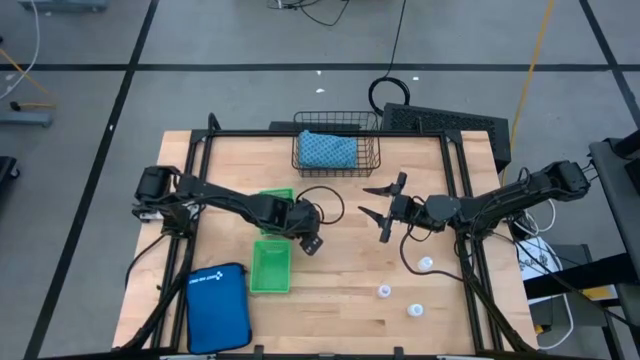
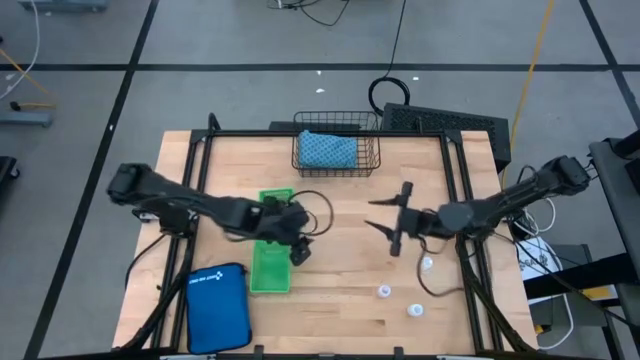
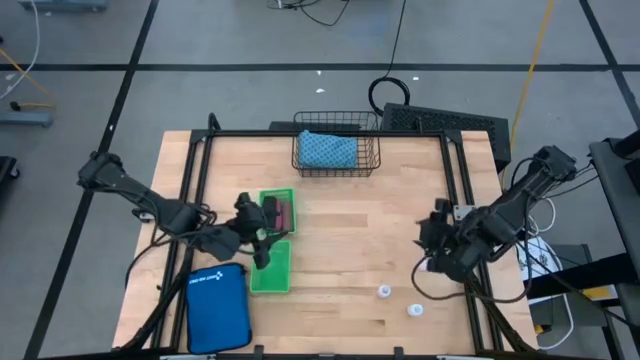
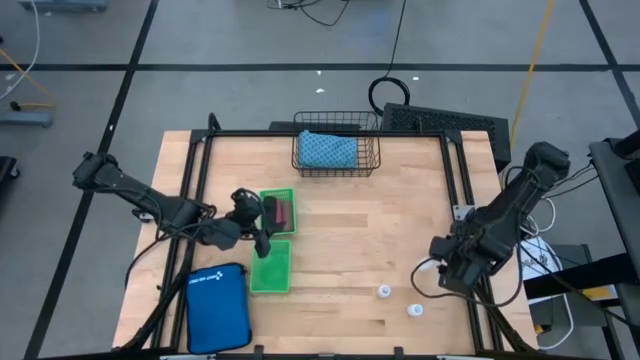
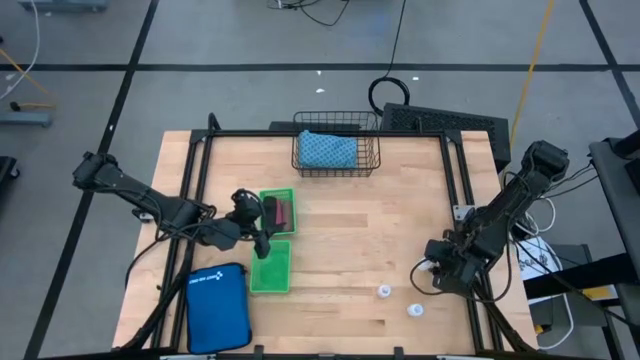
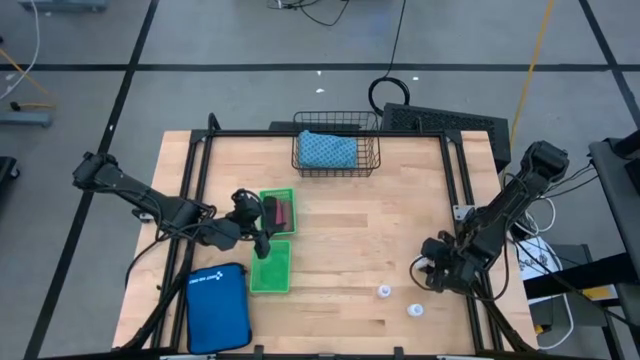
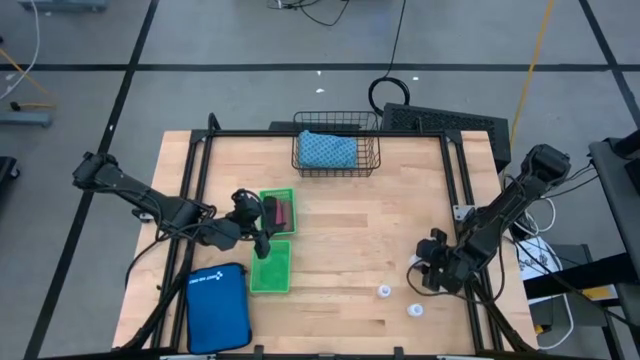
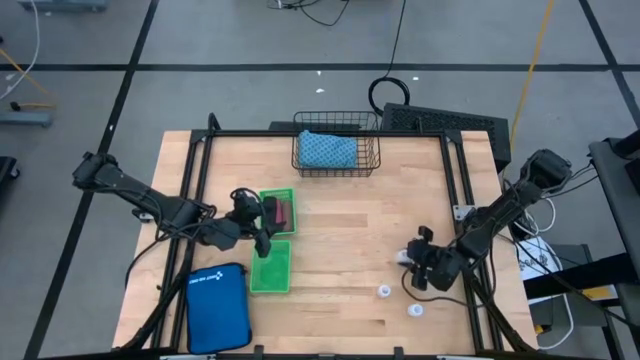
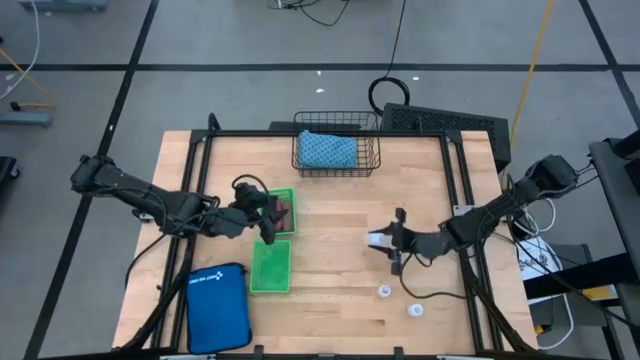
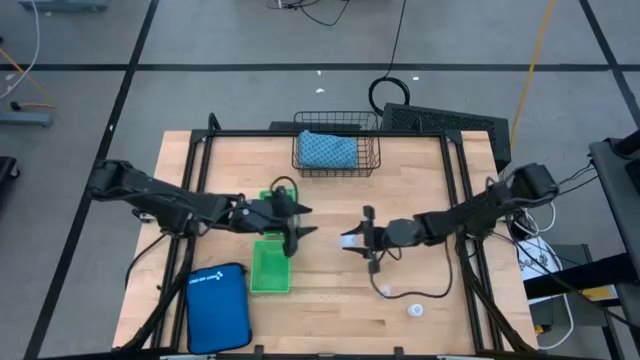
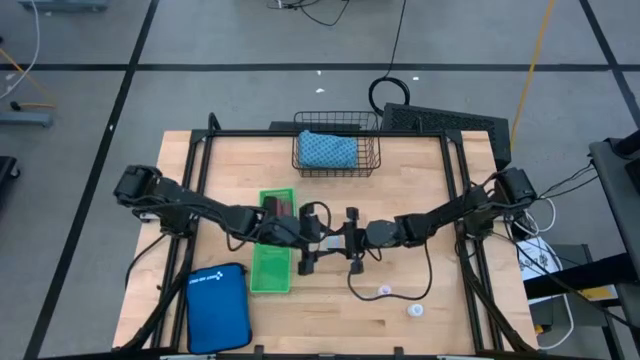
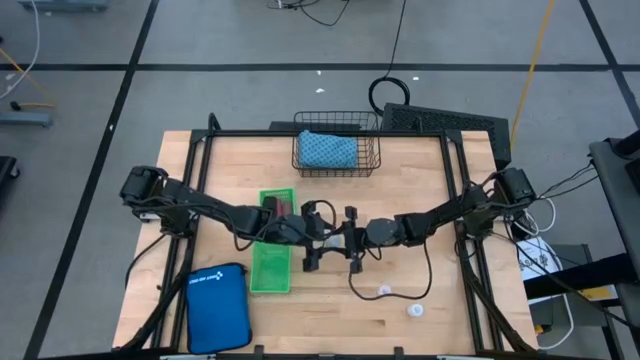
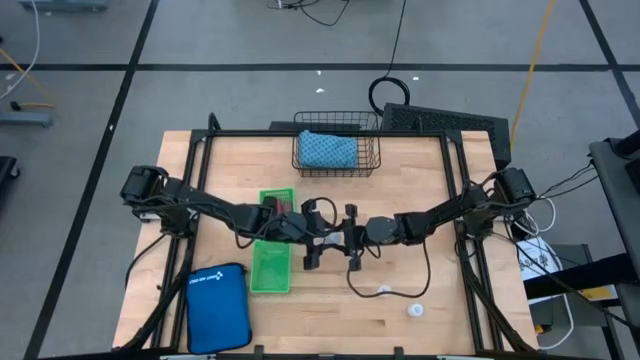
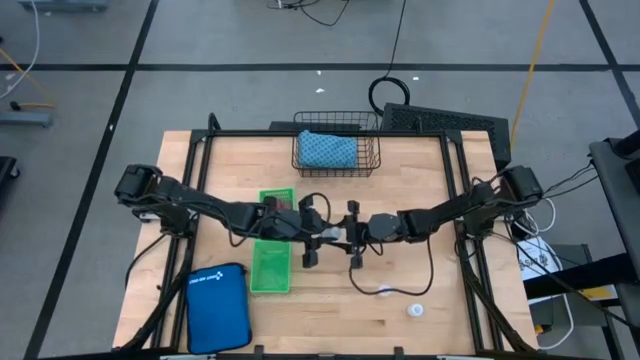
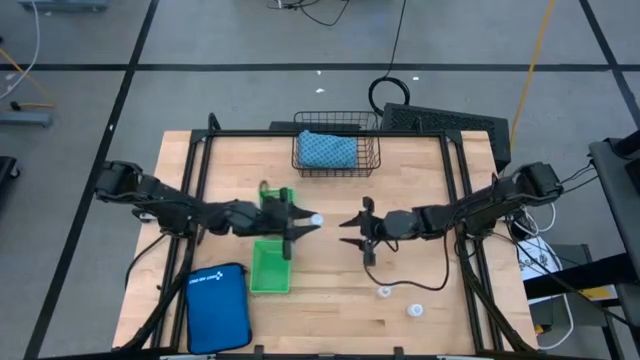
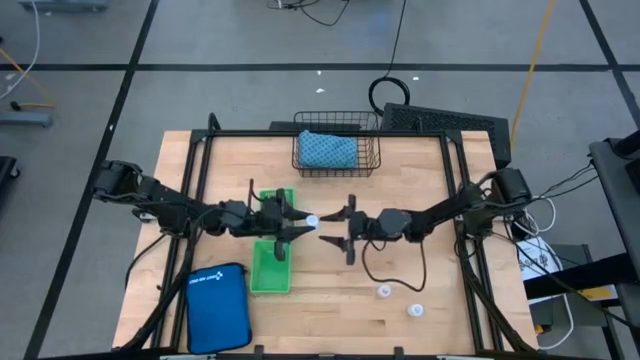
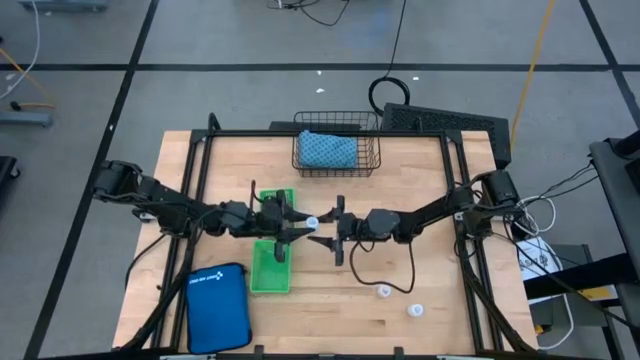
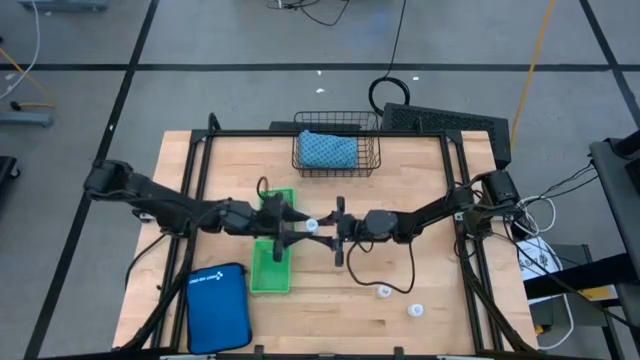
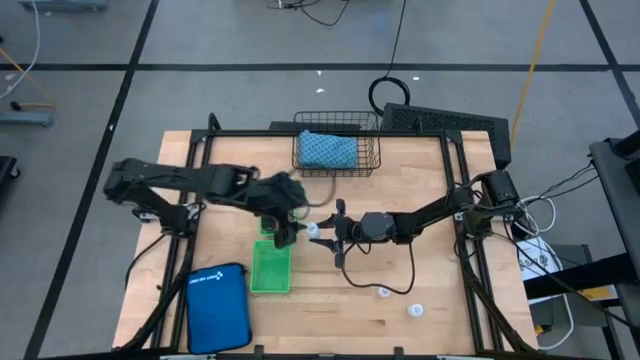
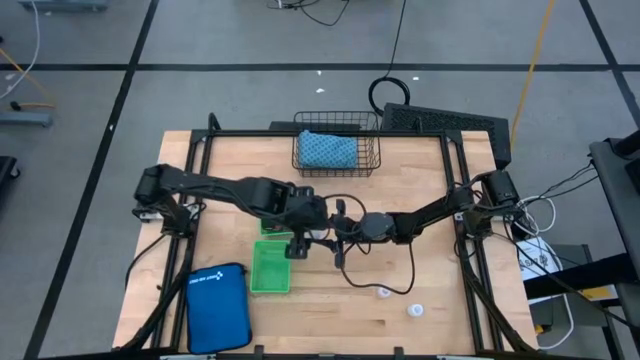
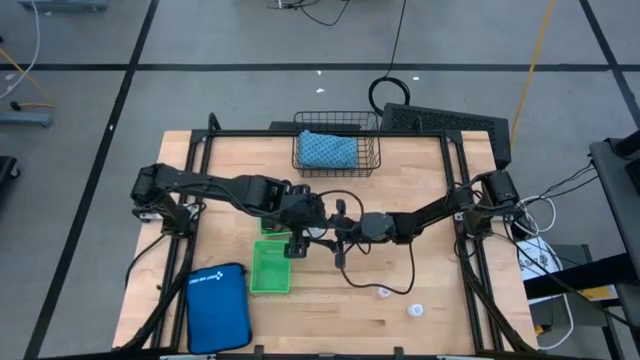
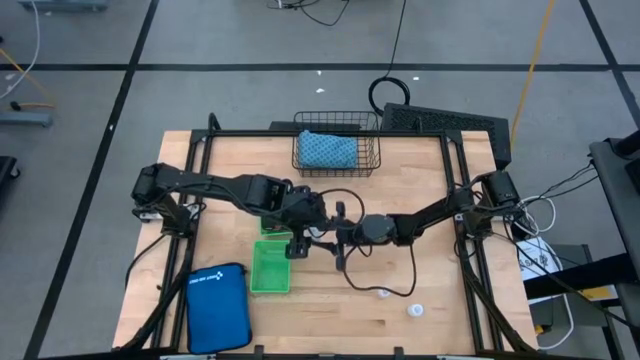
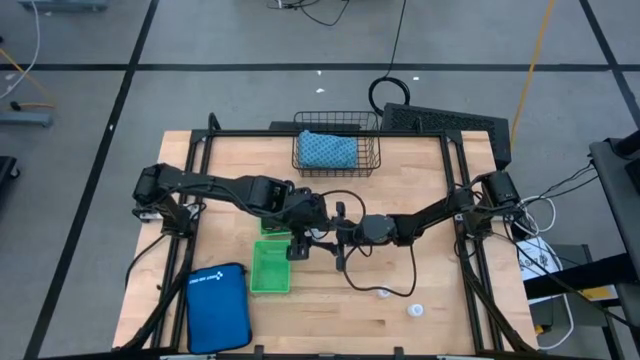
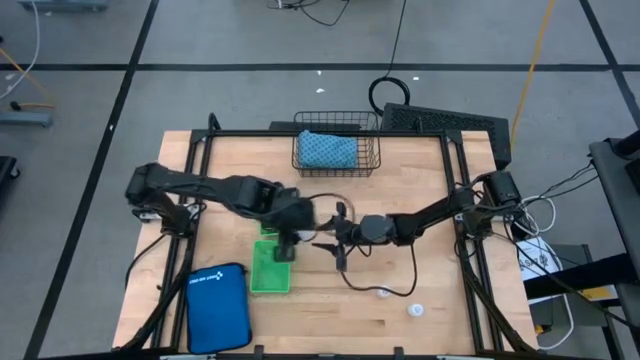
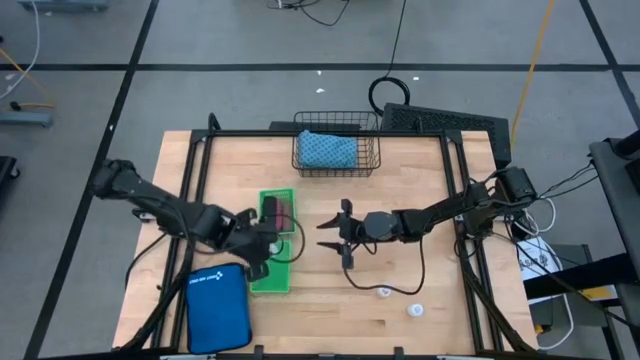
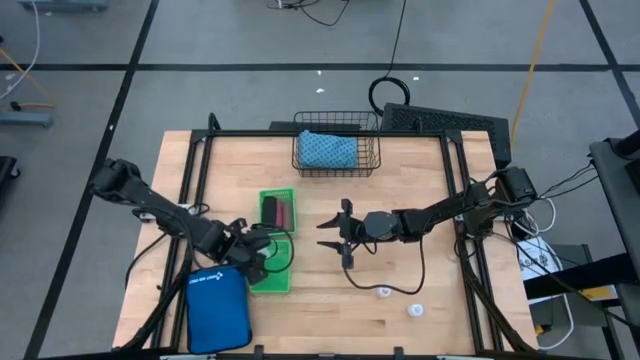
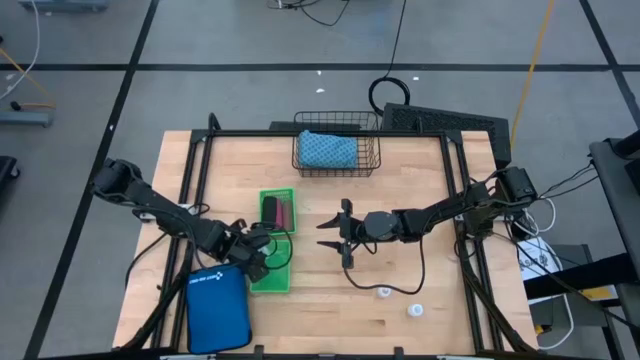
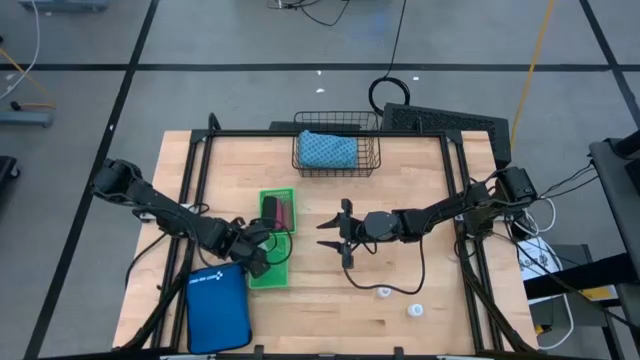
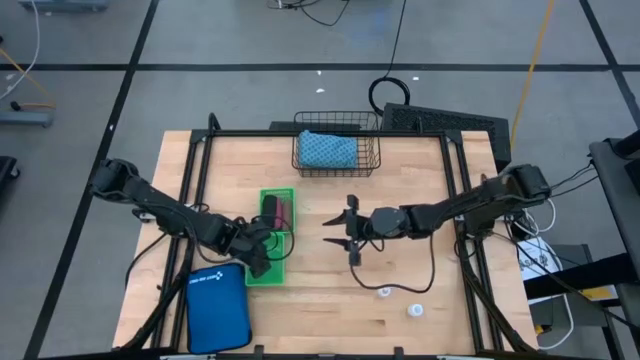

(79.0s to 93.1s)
Task: Pick & Place Medicine items
Put the top white pill bottle into the bottom green bin

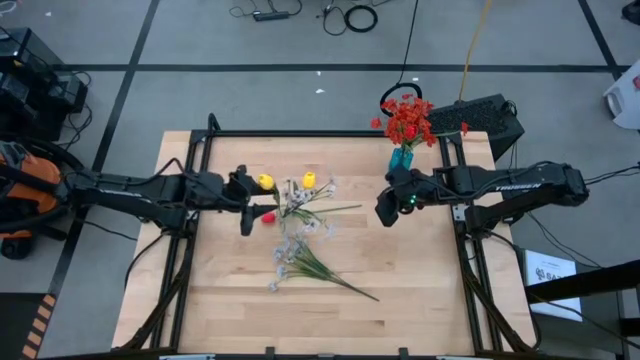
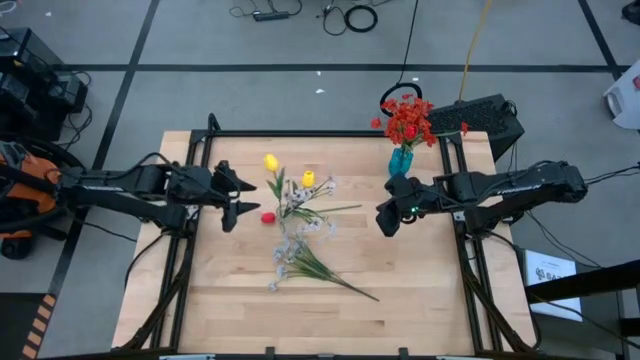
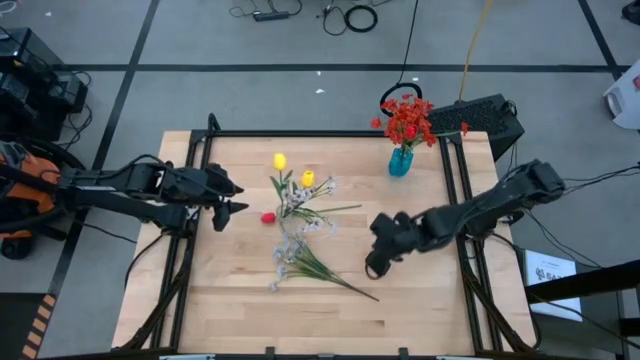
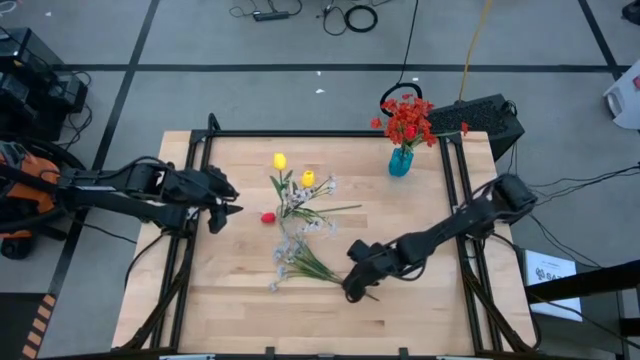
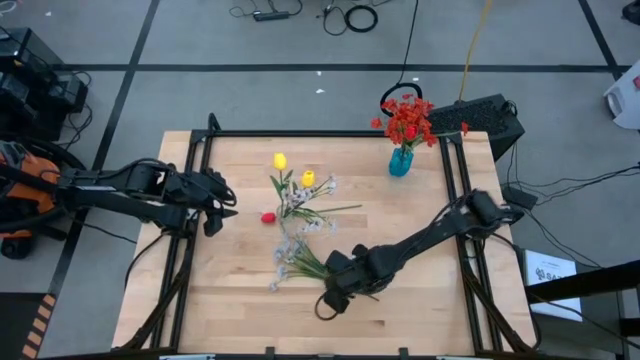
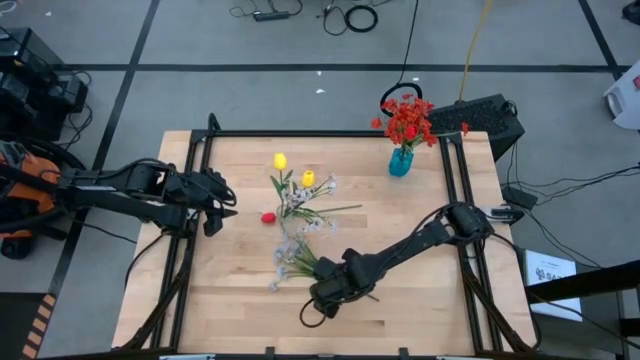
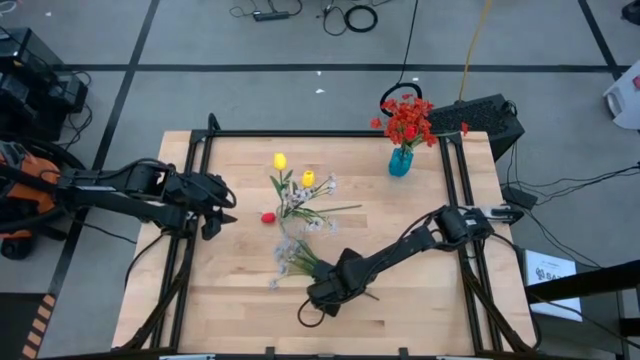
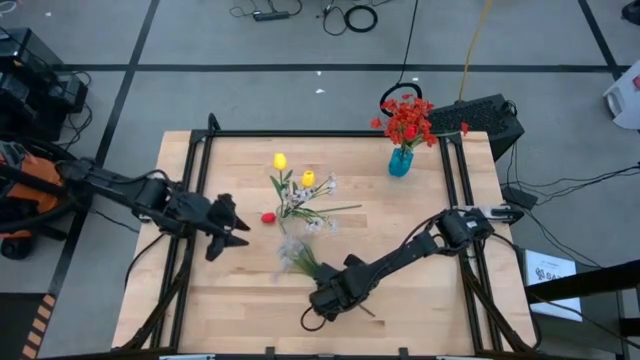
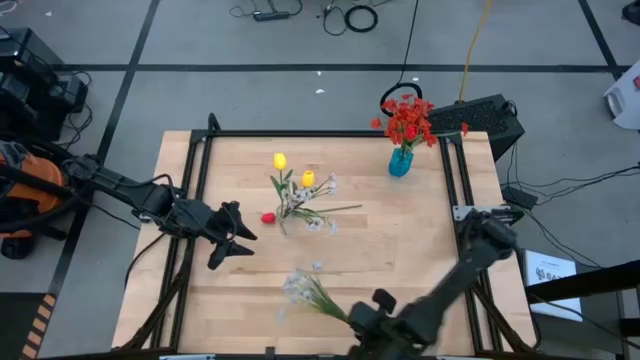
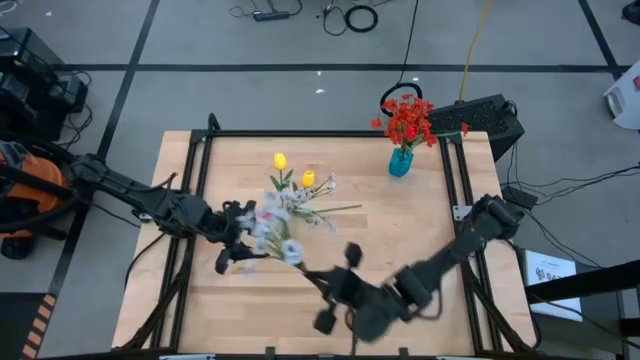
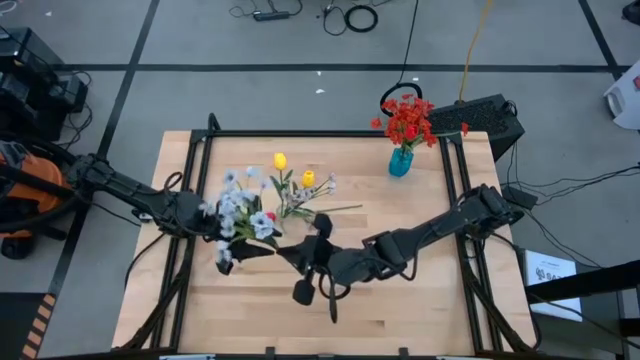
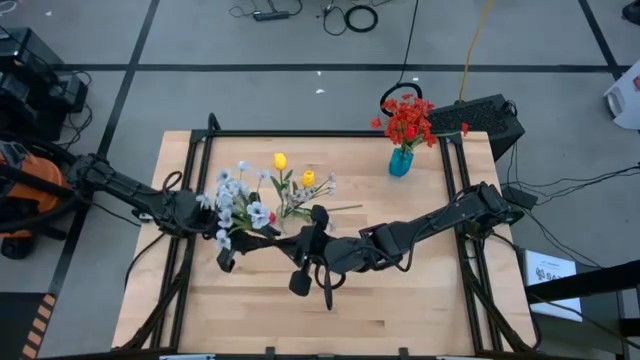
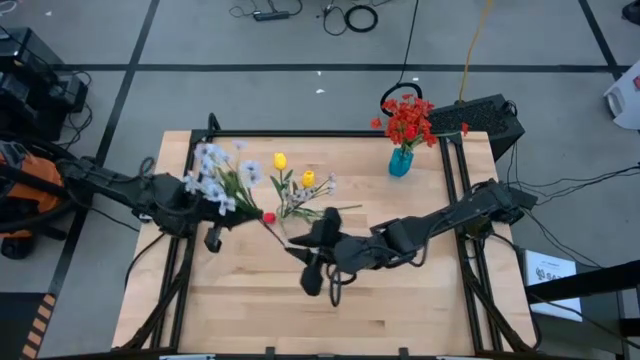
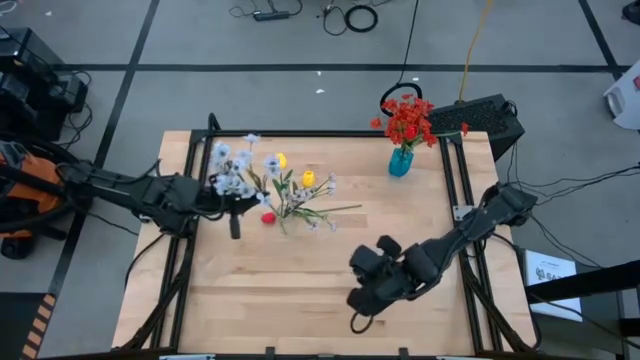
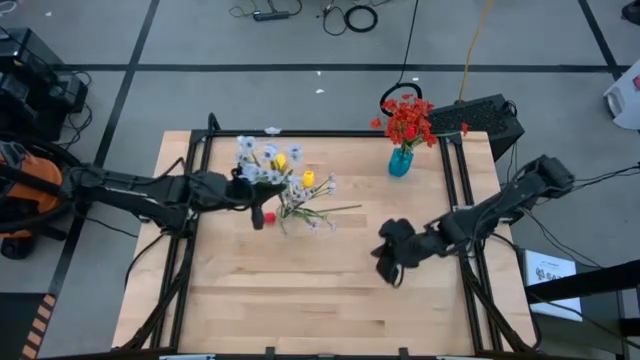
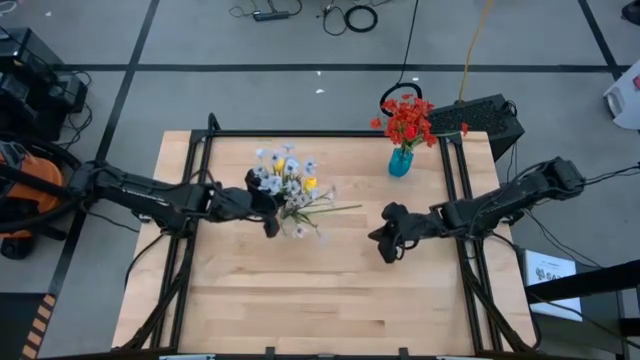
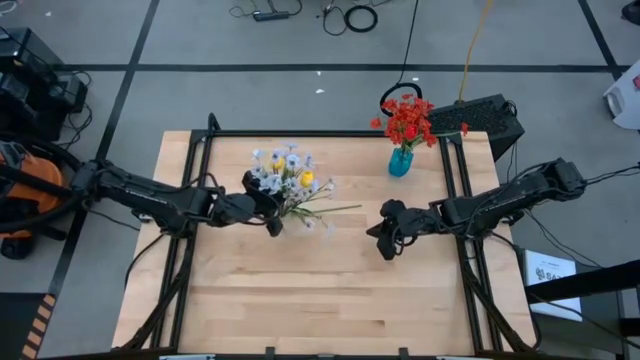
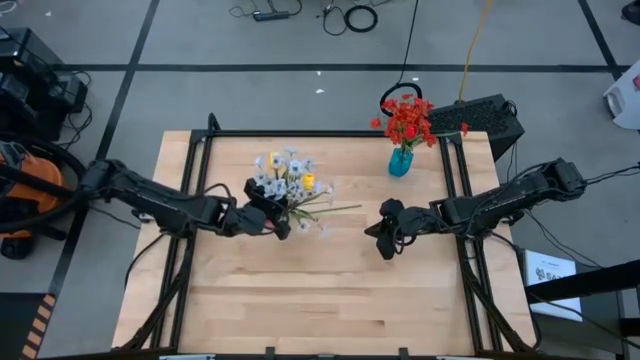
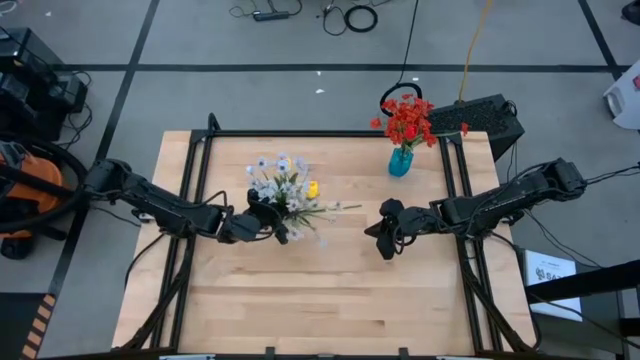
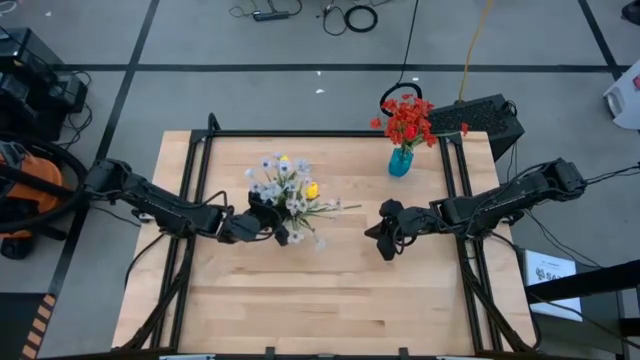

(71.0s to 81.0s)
Task: Sort flowers into vase by color
Put the white flowers into the transparent flower vase
